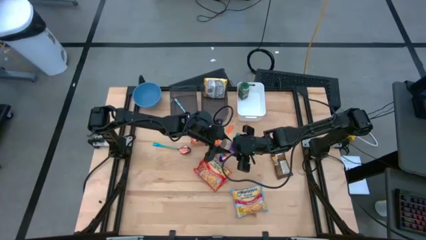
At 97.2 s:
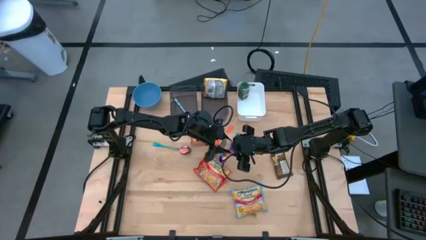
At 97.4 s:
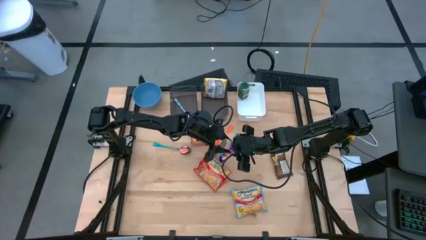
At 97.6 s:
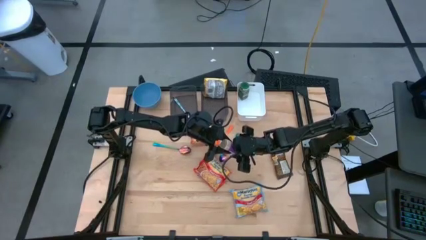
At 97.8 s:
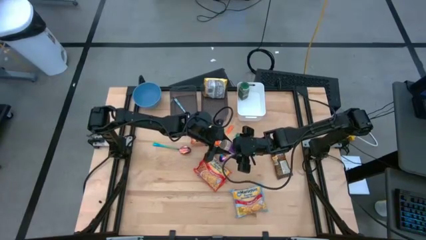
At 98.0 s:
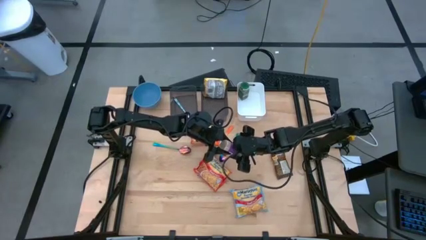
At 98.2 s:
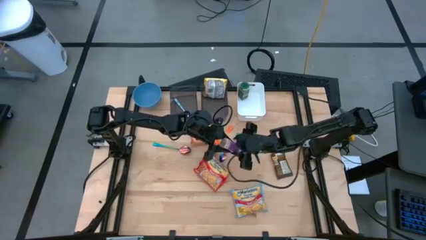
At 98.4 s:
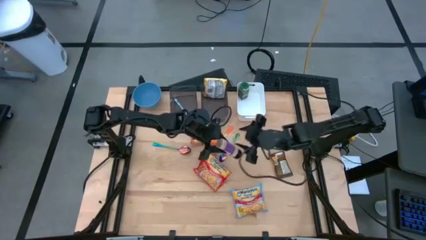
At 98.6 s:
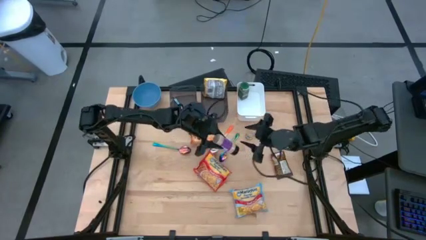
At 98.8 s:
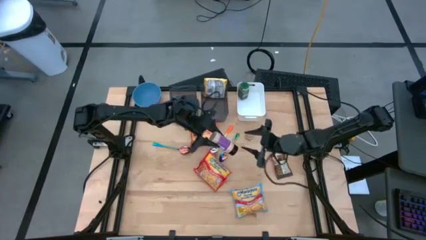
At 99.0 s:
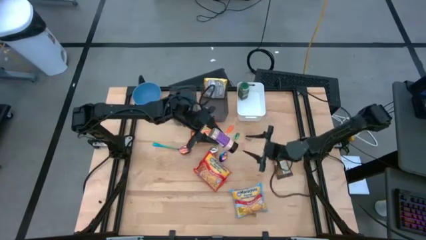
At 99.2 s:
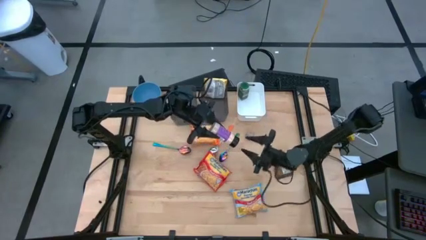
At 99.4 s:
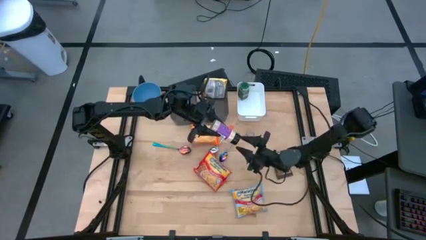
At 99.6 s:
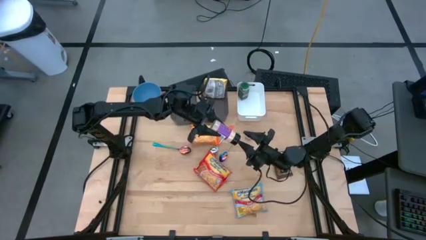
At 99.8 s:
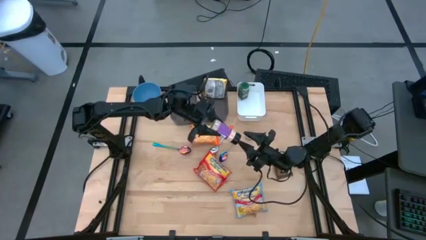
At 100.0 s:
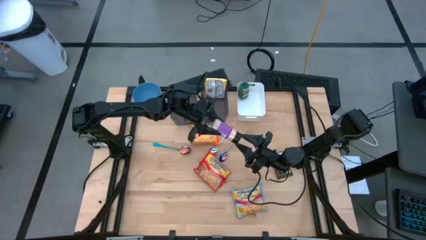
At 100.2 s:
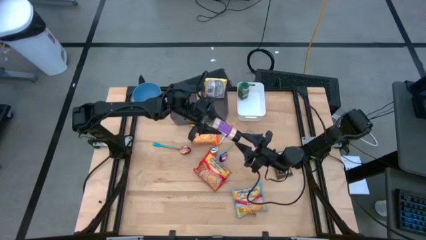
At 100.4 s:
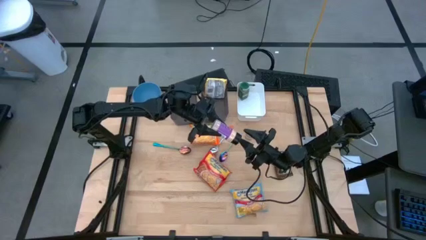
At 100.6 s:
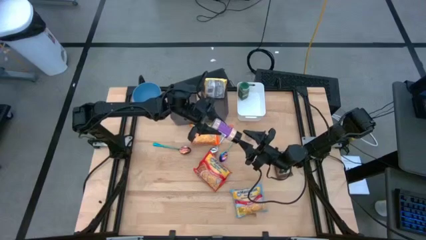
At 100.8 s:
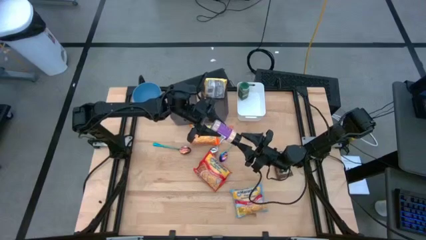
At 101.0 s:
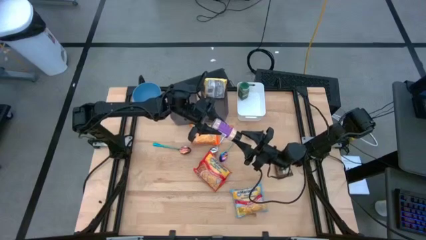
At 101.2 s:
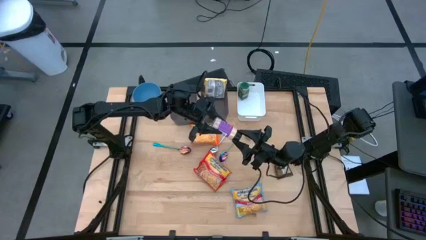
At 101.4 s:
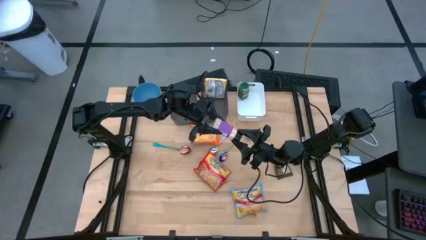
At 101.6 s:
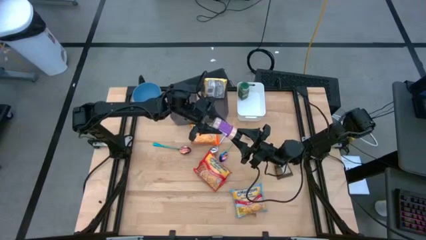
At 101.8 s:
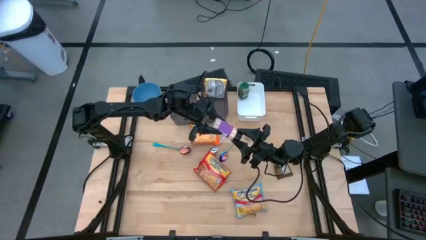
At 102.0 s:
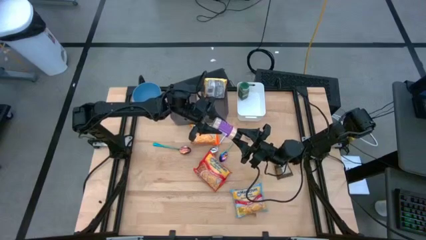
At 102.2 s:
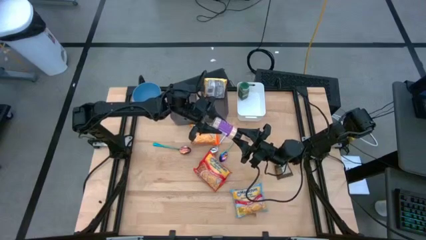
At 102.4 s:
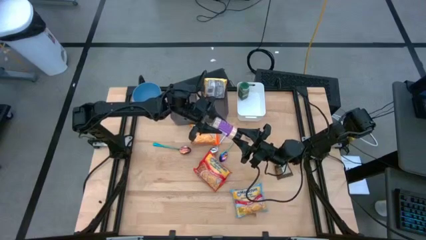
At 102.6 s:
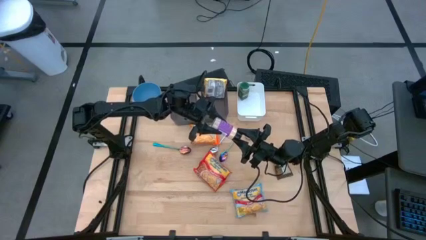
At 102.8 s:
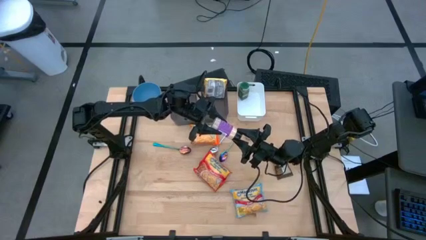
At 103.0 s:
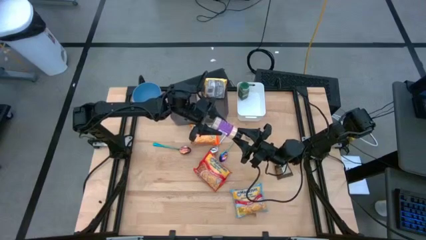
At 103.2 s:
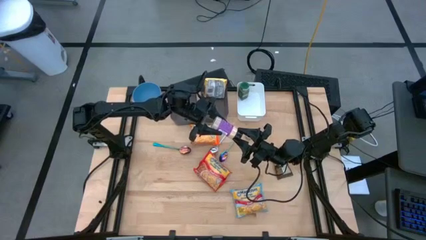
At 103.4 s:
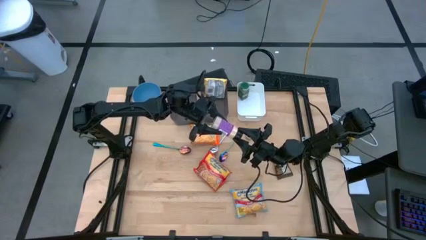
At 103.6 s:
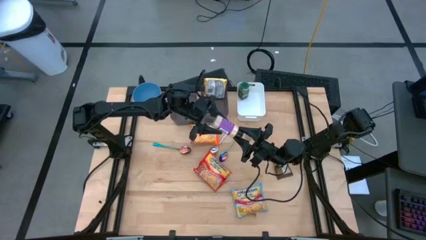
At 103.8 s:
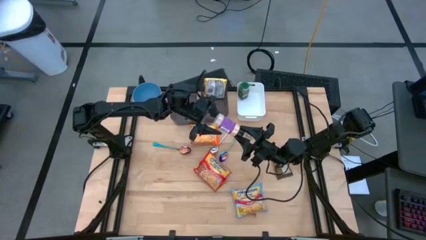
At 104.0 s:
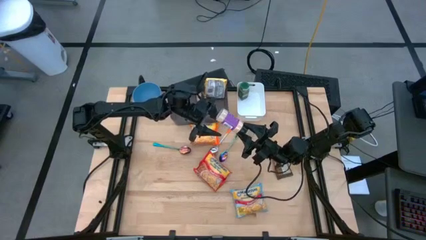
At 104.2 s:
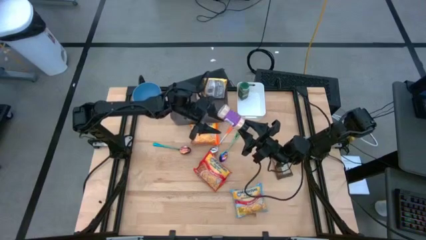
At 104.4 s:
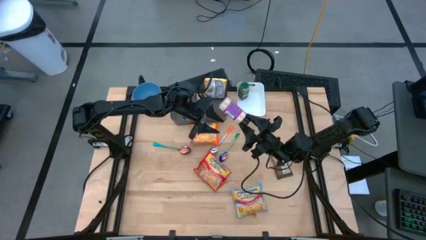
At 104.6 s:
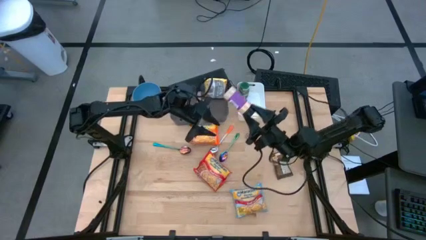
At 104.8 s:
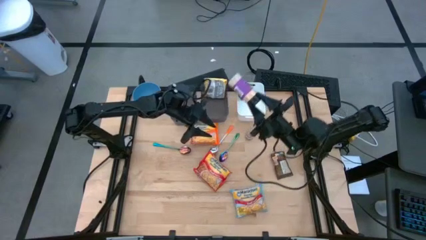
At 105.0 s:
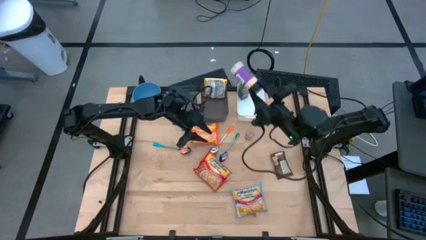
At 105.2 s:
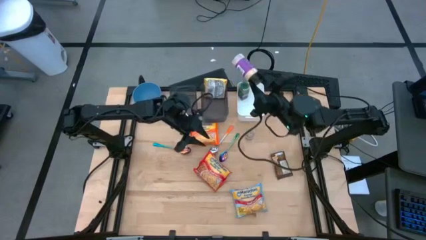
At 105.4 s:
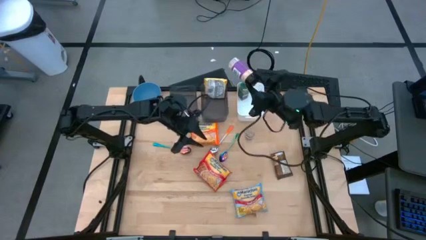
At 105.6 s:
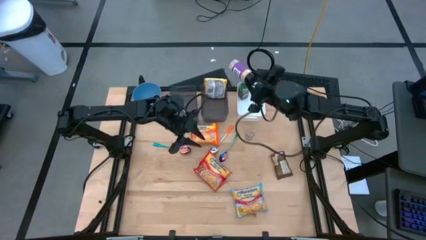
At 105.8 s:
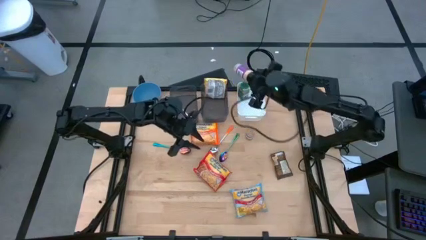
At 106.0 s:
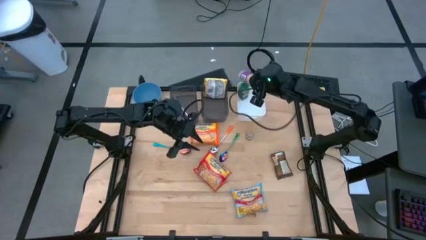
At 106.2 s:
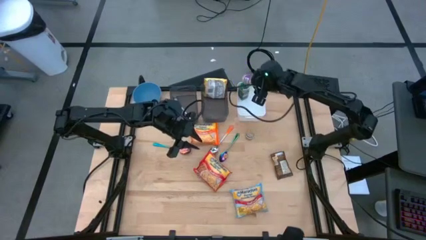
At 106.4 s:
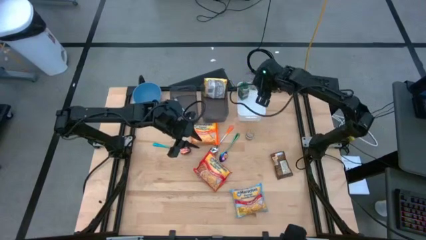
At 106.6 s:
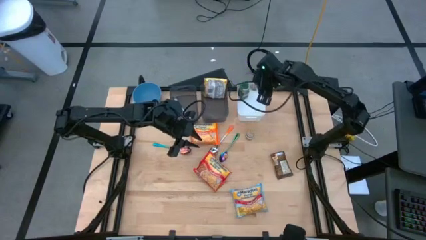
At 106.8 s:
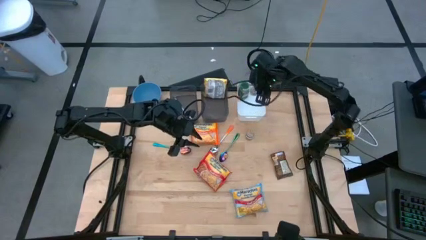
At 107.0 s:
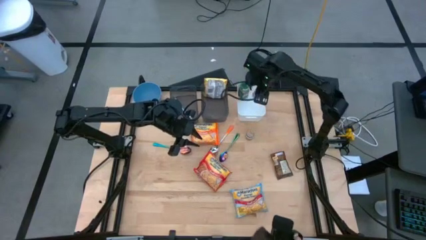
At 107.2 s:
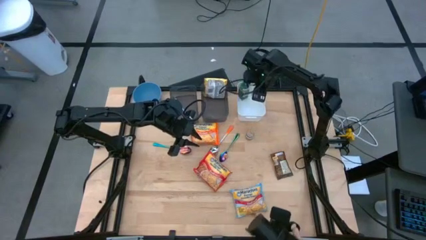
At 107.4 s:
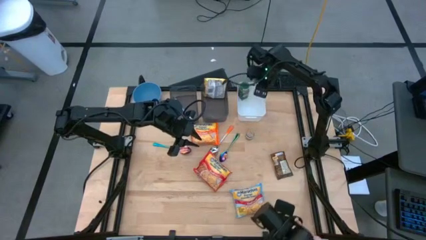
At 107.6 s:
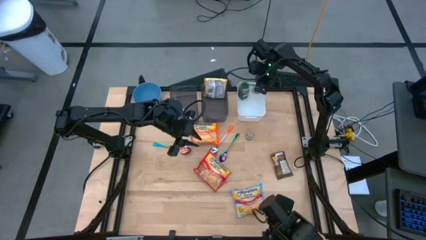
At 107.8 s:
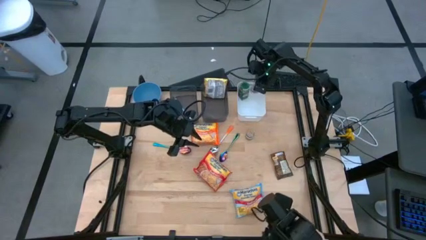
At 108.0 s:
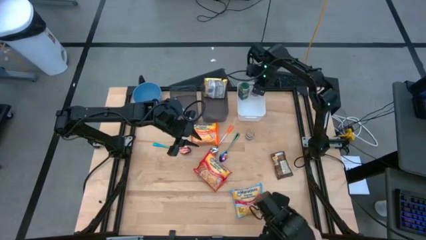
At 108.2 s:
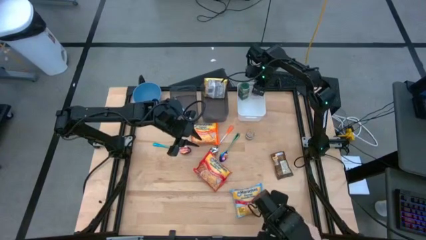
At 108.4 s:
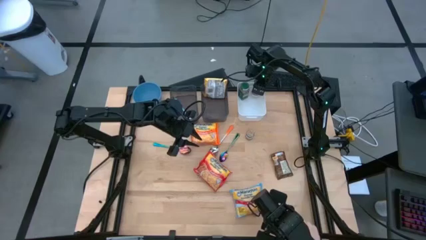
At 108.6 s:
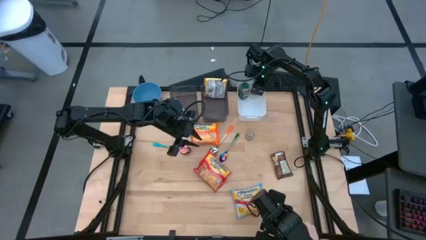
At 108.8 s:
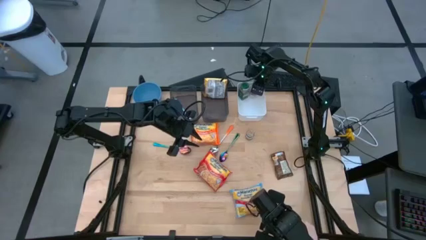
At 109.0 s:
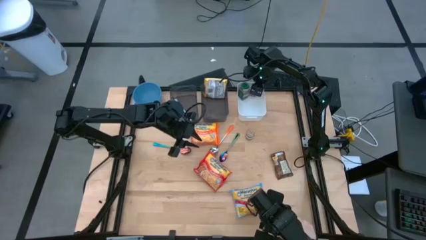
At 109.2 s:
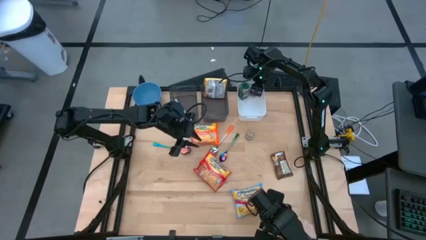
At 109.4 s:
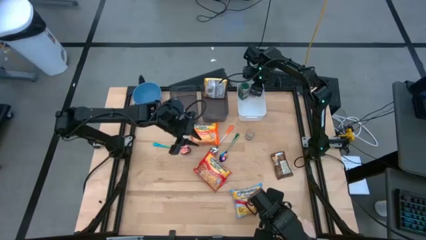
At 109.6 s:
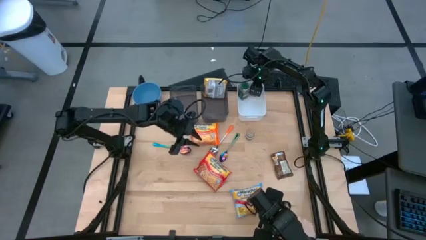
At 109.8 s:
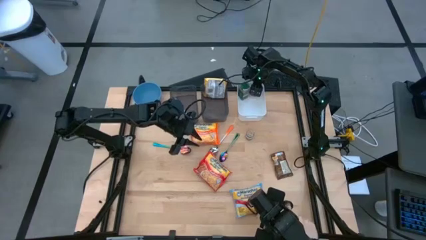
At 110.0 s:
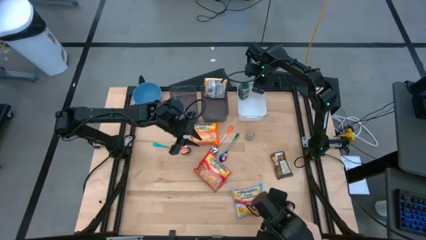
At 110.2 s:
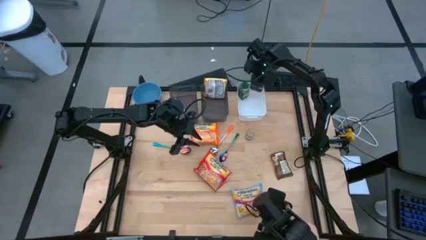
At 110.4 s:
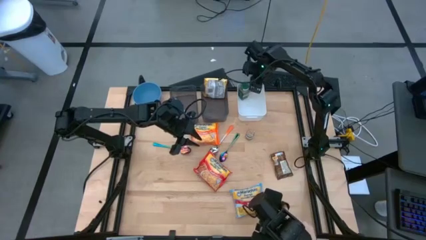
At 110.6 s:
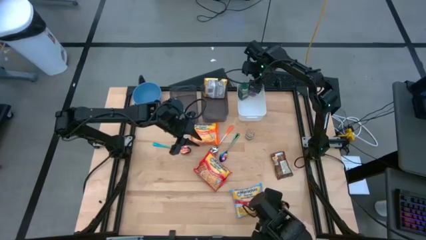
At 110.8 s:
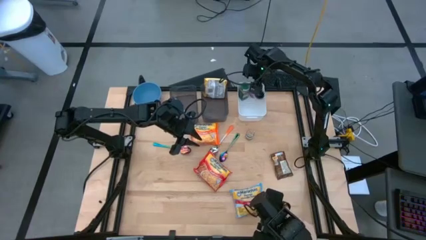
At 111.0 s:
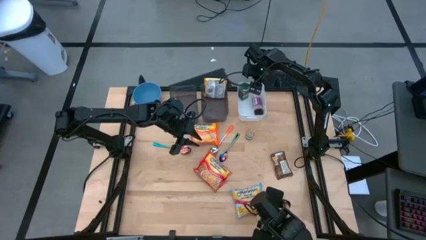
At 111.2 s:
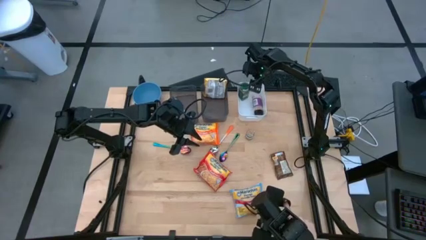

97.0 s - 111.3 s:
Task: Pick & Place Food Item
Put the purple seasoning bottle into the white bin
